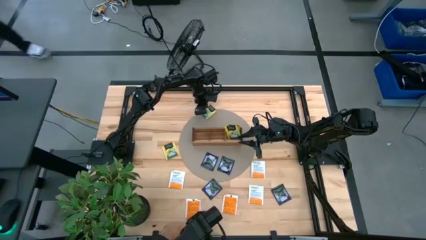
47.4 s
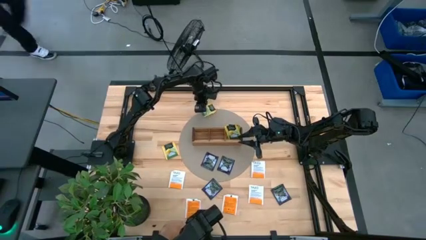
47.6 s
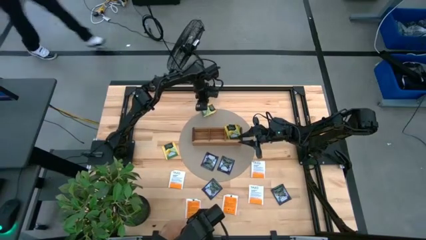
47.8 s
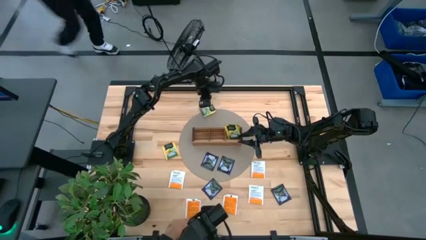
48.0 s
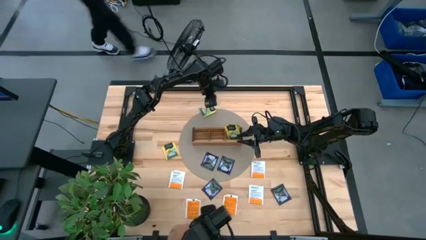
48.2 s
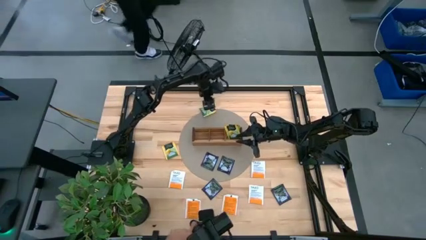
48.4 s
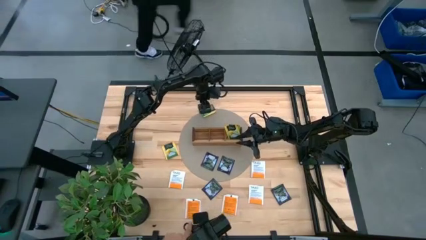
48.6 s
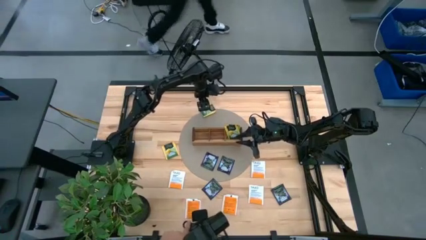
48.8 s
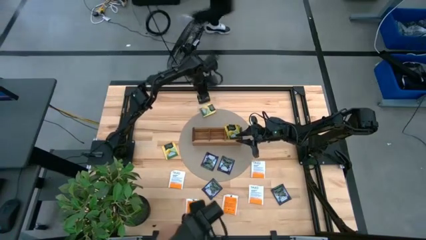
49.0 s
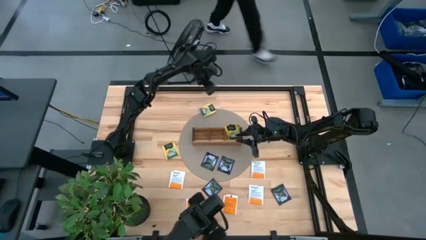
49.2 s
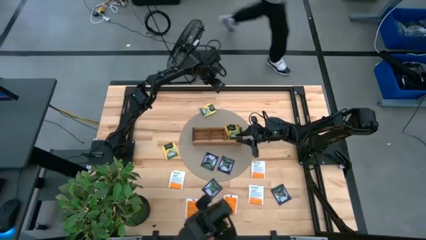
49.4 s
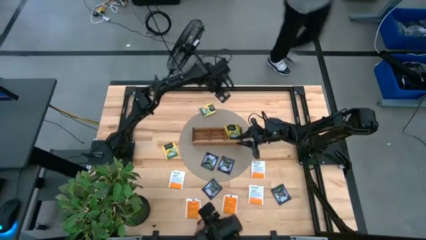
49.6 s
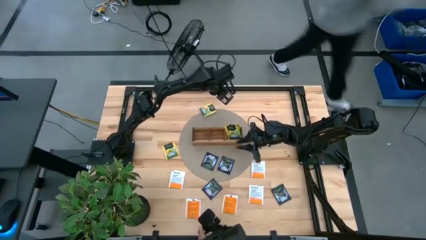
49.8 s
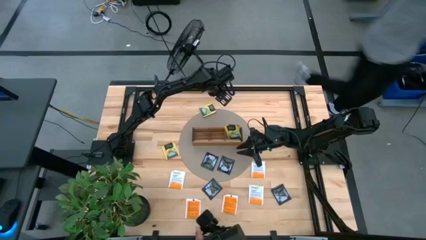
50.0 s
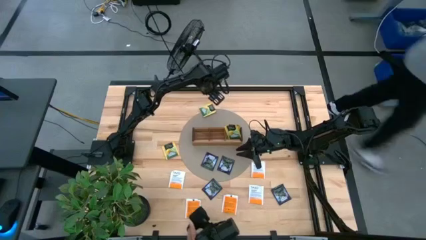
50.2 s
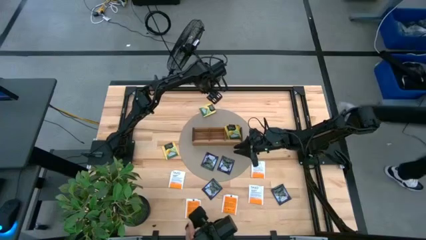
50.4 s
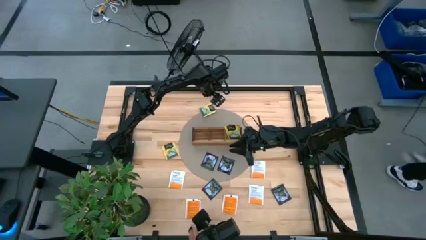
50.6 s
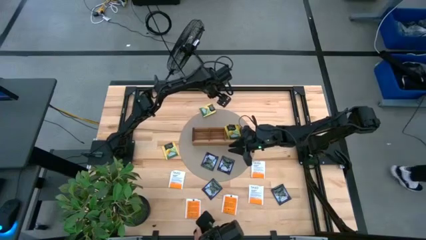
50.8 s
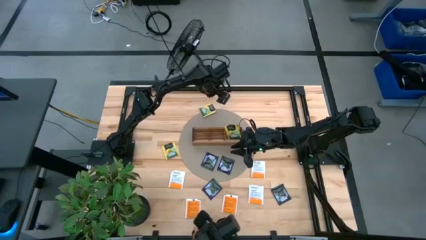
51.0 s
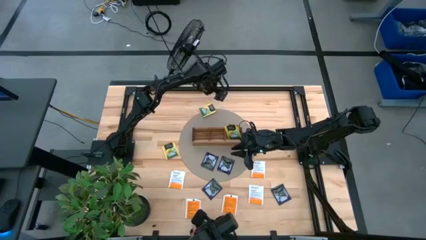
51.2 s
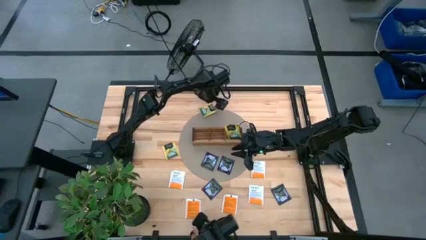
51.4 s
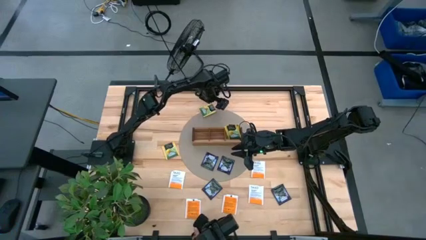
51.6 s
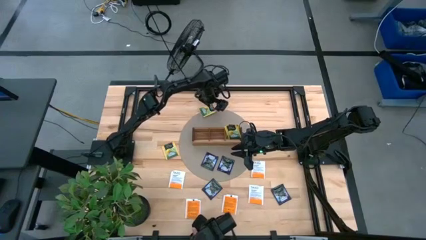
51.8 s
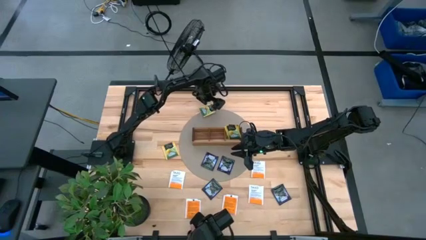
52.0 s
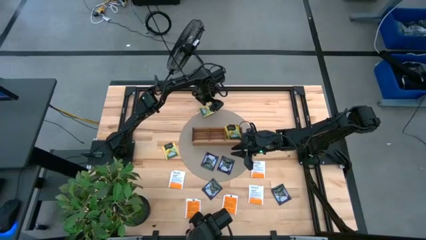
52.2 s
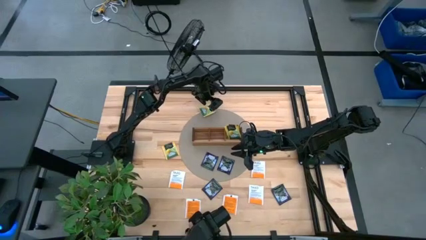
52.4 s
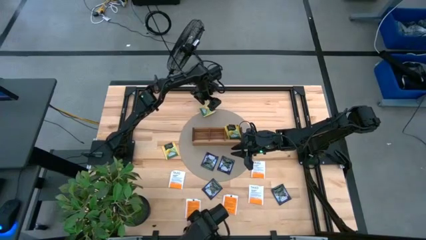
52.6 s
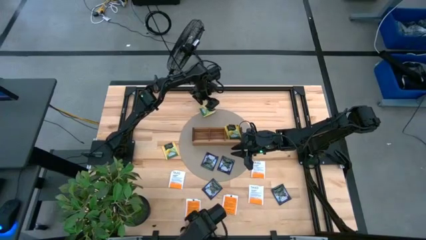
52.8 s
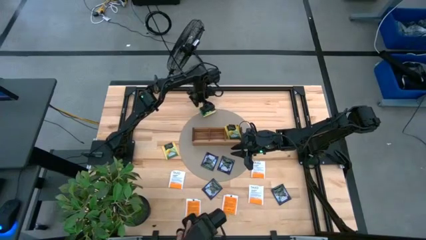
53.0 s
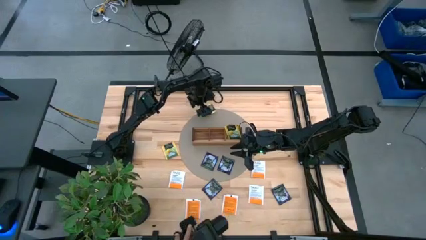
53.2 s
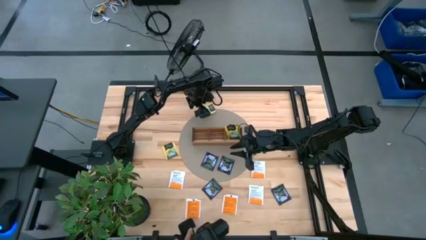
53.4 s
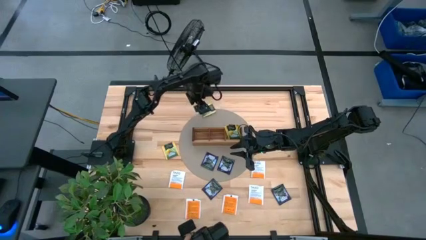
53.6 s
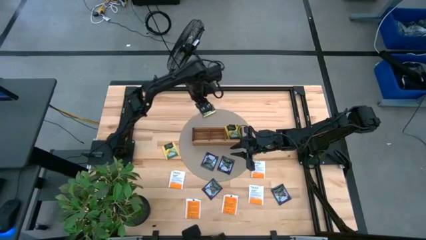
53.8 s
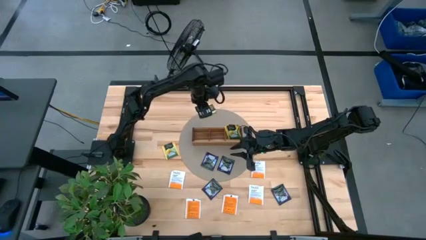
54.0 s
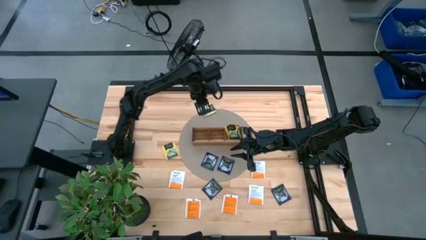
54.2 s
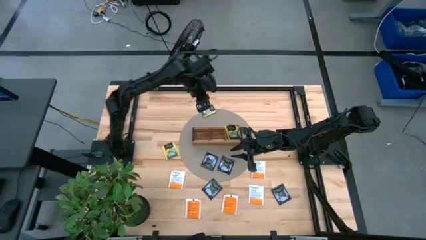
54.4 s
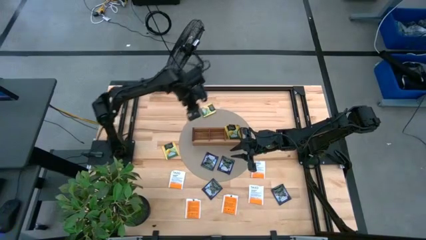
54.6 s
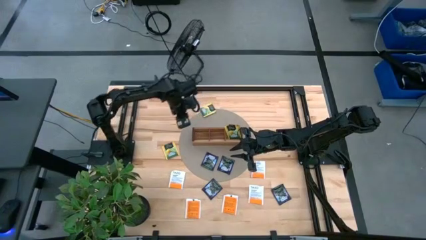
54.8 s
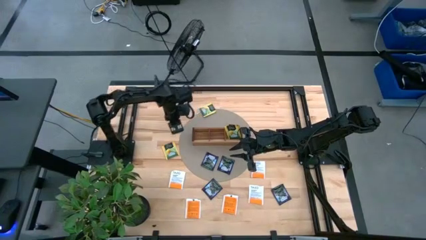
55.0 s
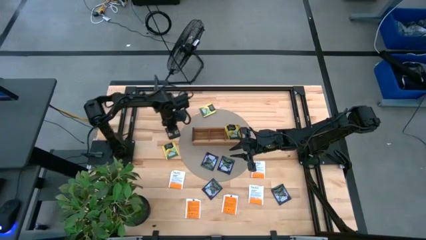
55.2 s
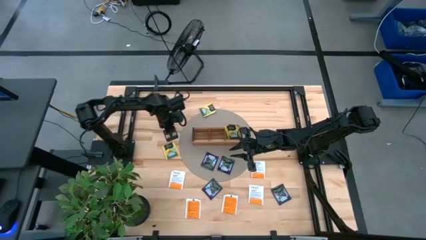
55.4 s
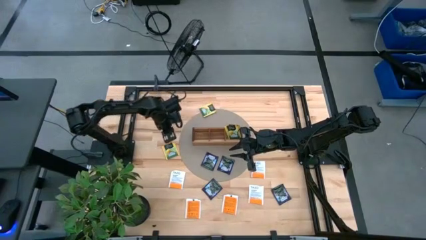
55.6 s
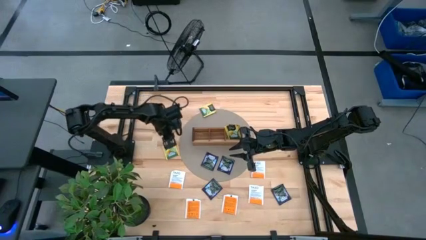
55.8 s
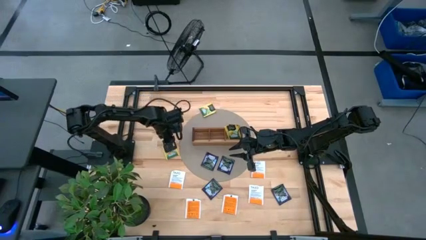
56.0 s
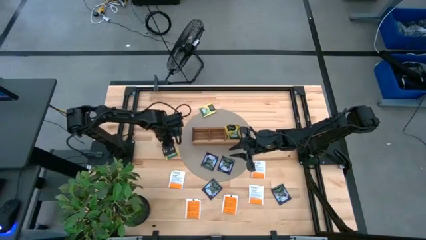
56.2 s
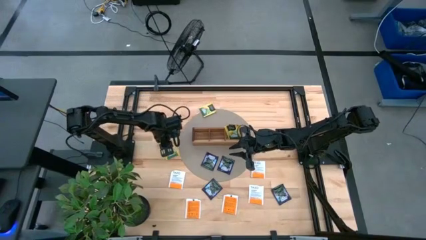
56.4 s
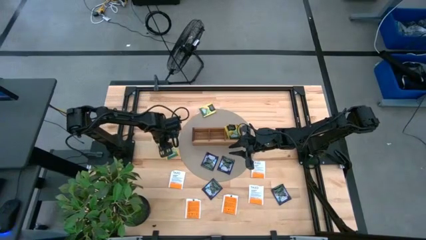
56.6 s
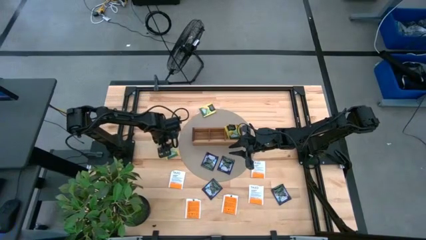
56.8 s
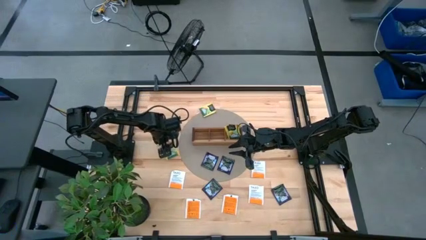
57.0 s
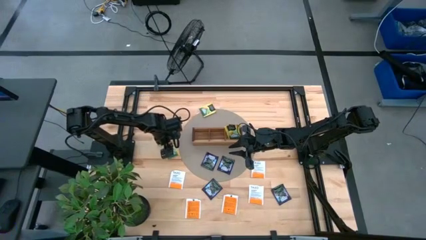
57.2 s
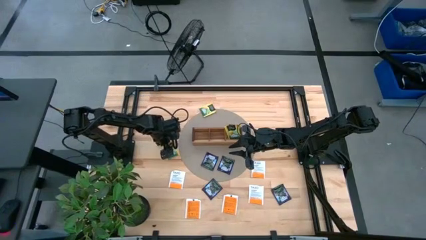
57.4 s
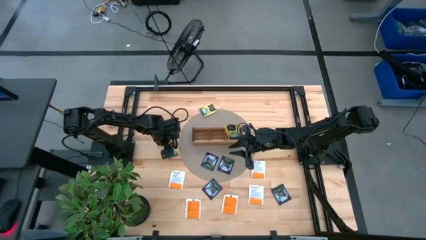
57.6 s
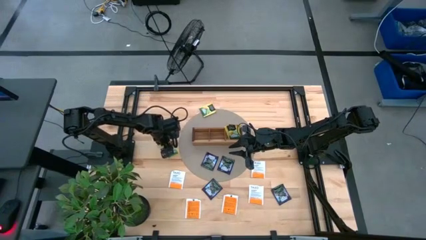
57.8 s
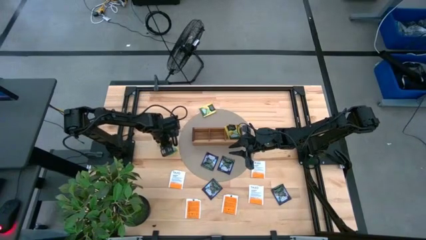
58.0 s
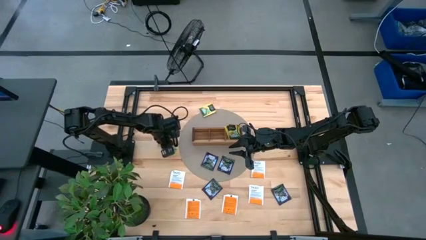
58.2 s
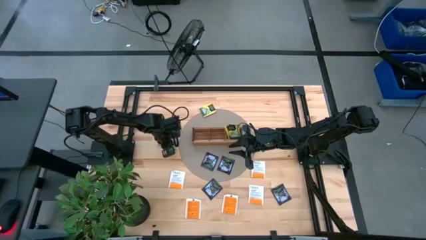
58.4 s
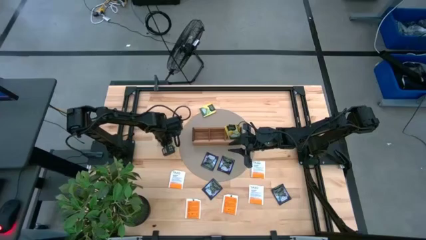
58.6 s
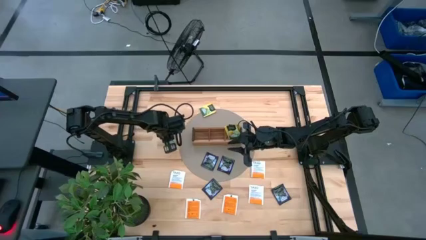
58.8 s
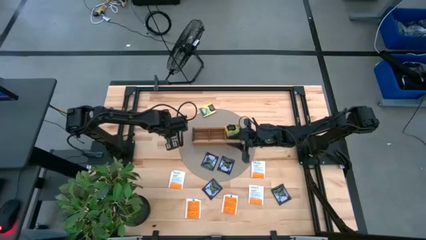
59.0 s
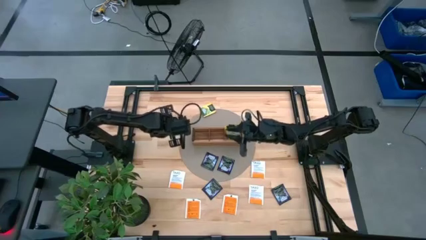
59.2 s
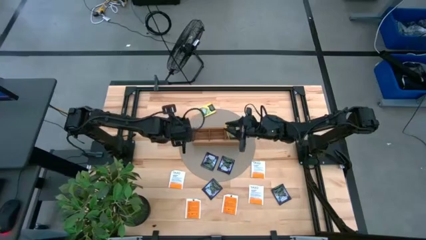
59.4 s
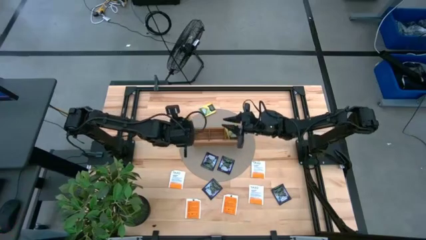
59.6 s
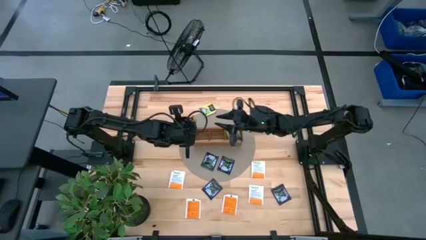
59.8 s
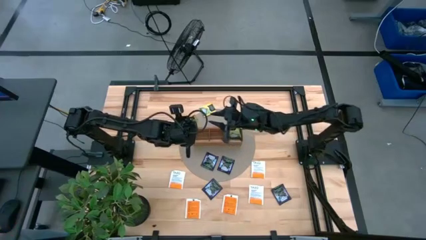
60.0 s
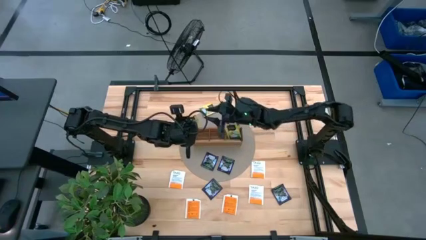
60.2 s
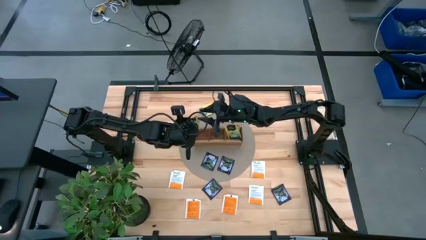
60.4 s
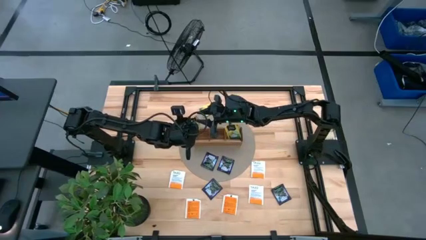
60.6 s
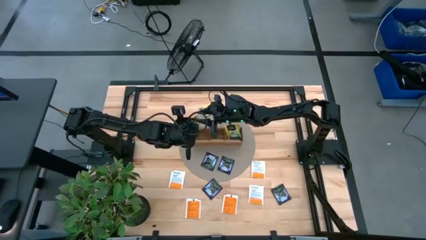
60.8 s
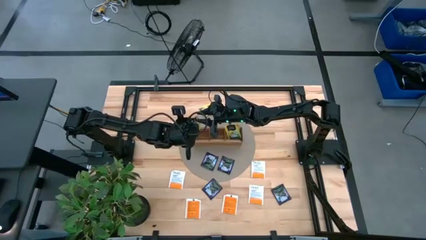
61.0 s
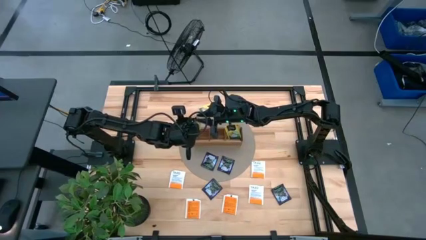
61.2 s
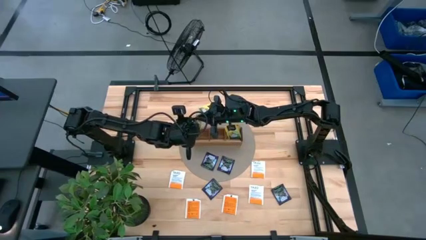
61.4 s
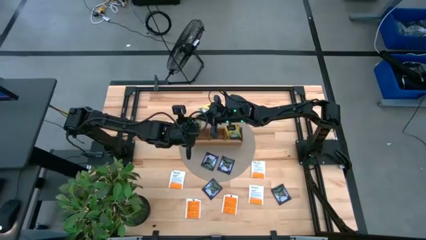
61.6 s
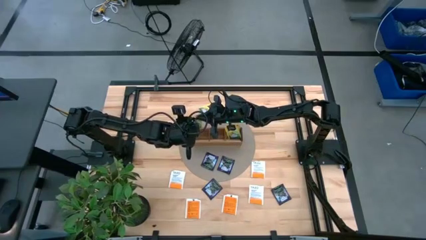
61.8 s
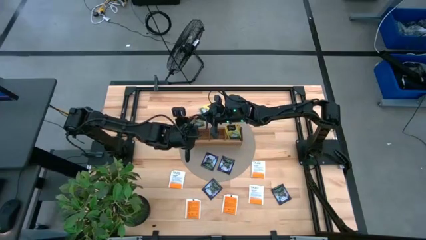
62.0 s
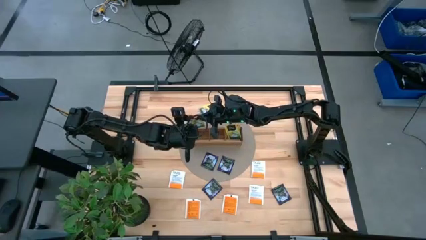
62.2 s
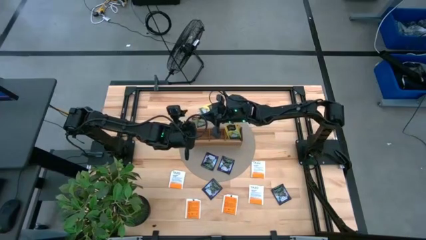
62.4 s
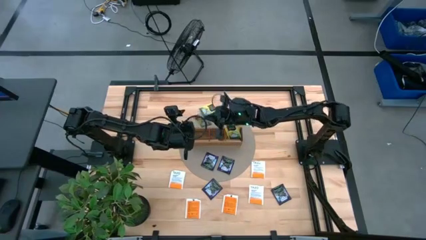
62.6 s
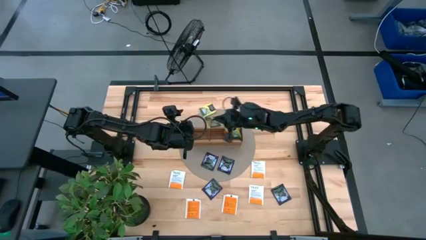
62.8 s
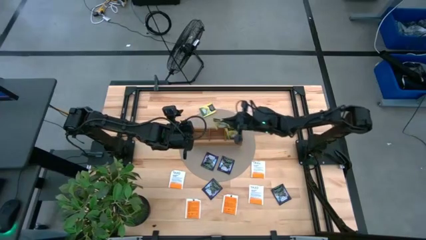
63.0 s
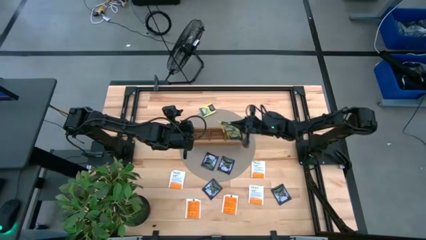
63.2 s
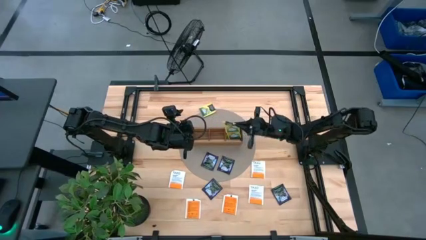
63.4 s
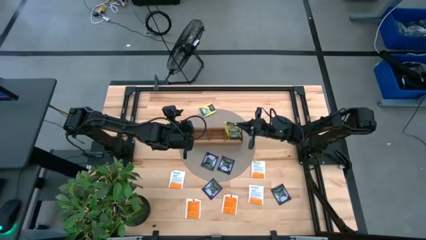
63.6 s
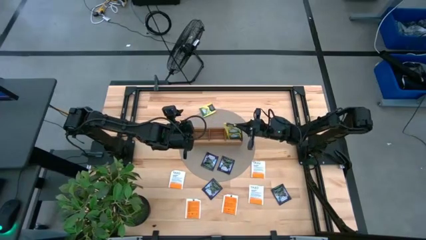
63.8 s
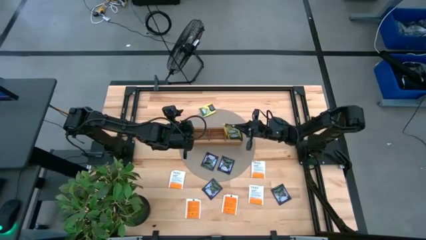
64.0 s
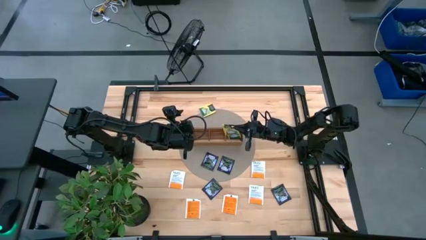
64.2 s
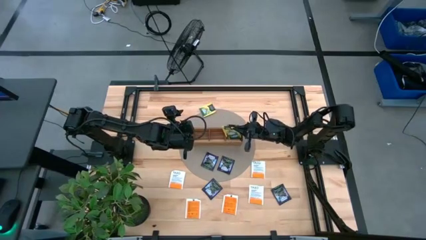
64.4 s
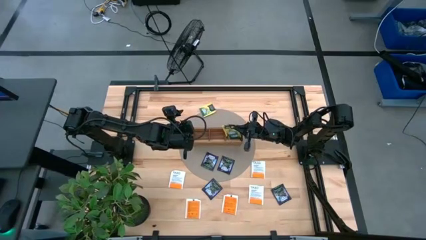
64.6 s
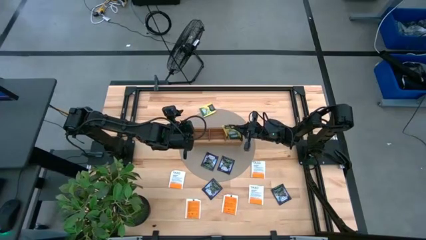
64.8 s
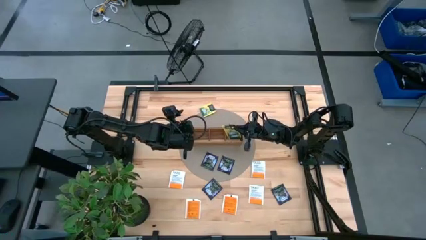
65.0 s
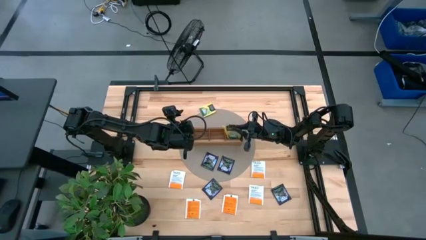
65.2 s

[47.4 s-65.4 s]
Task: Pick & Place Tea
Put the yellow tea bag into the right section of the wooden organizer
